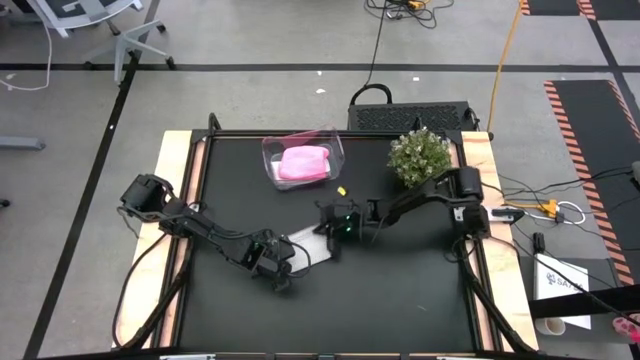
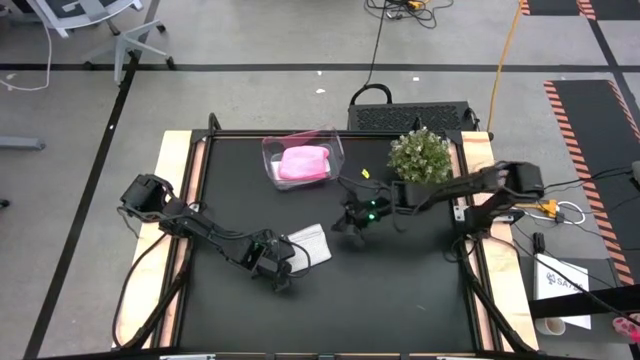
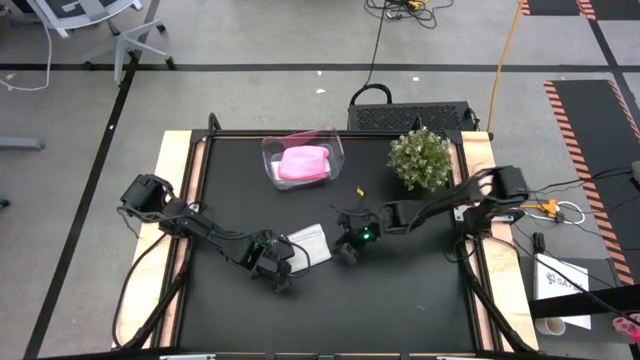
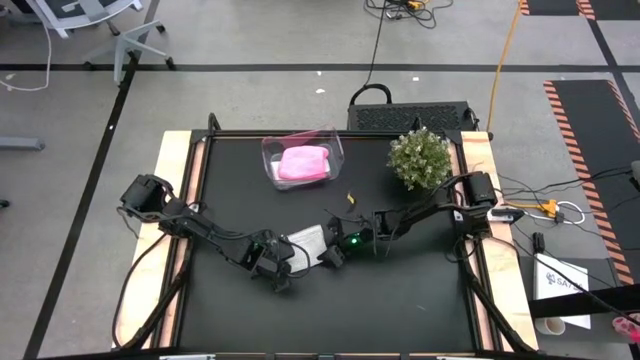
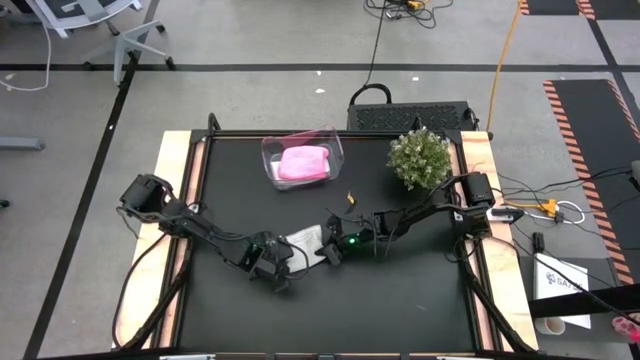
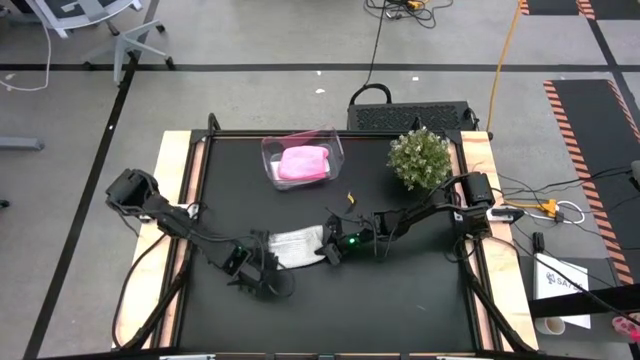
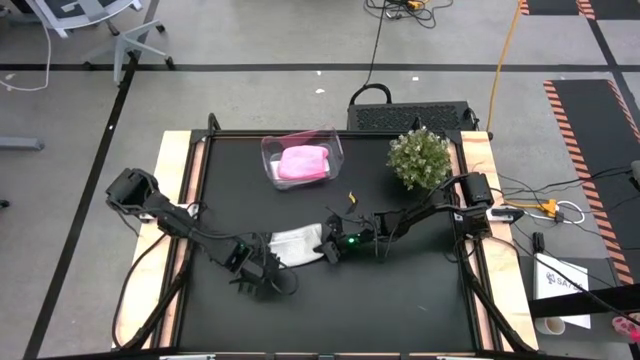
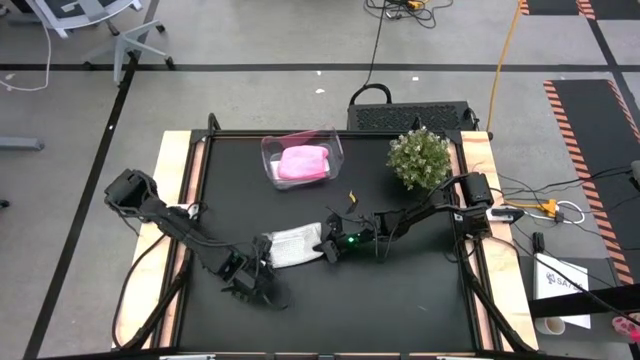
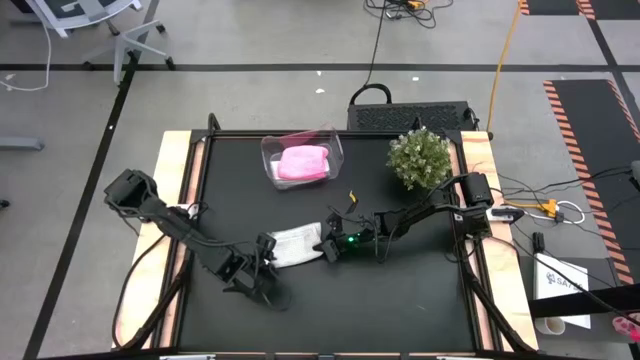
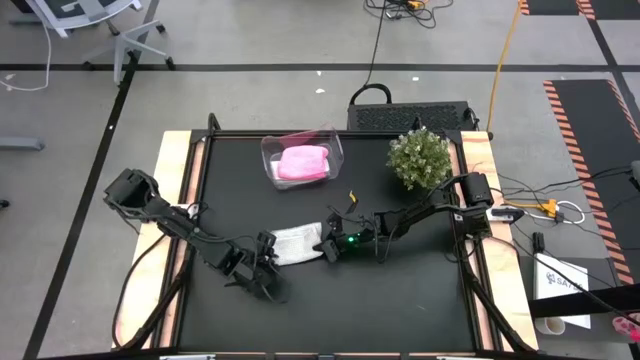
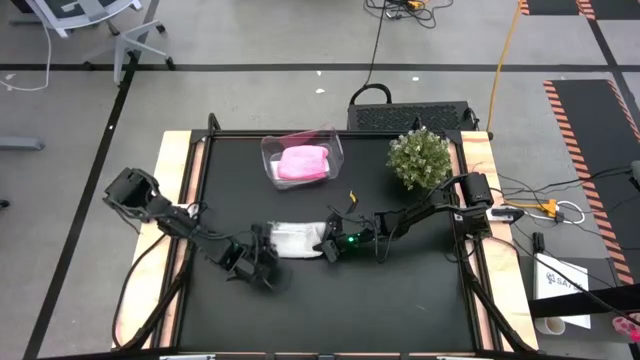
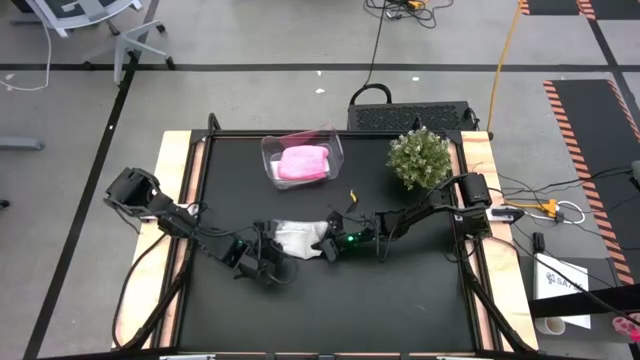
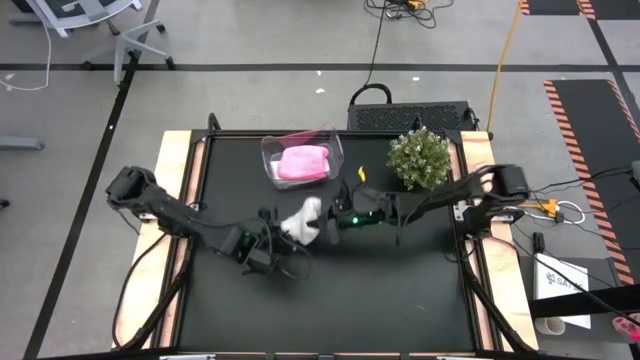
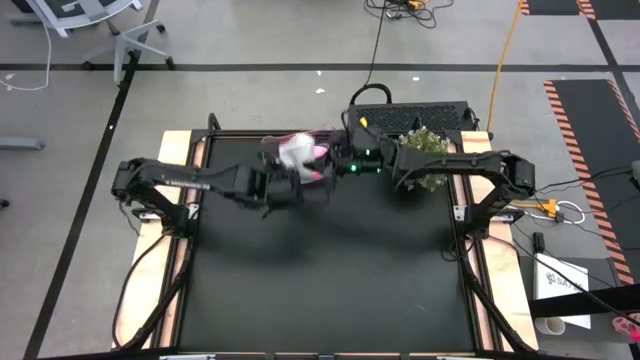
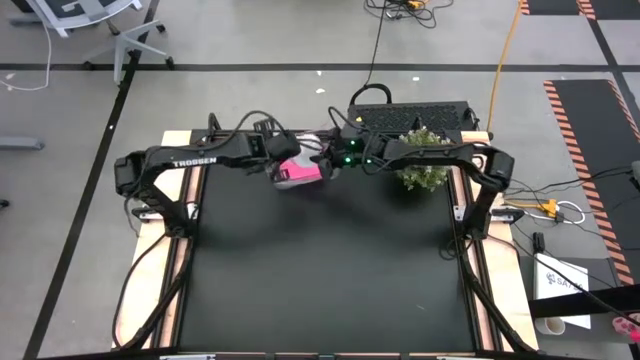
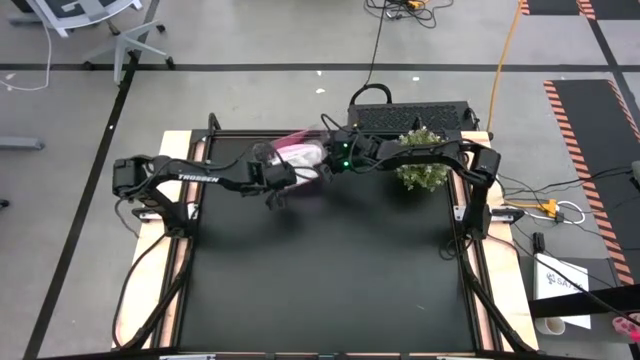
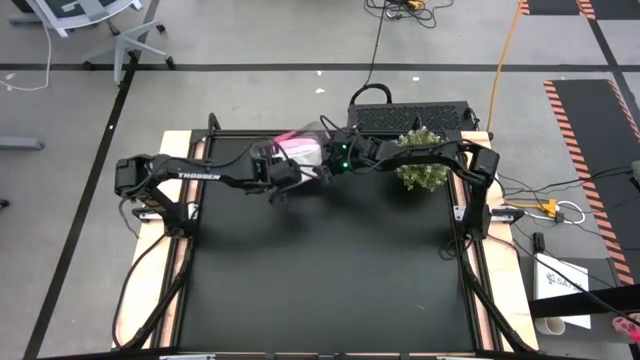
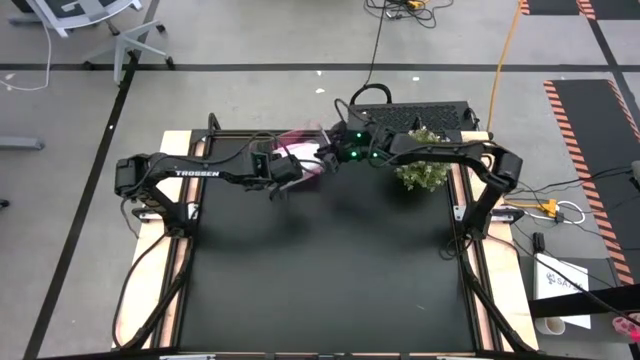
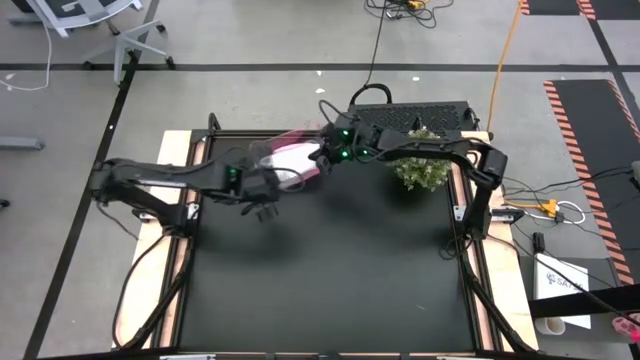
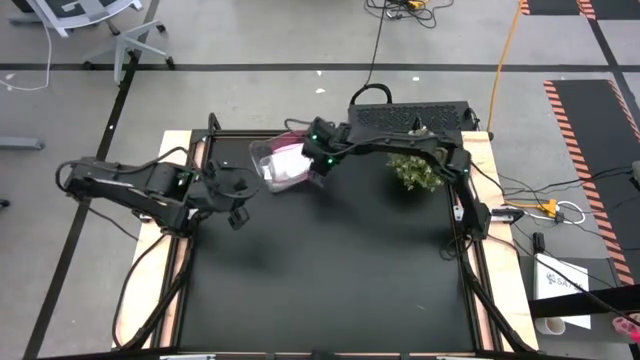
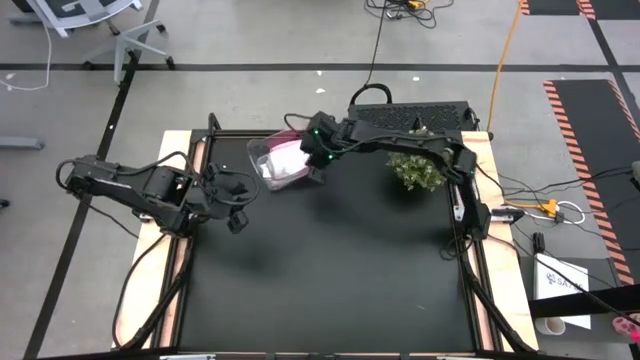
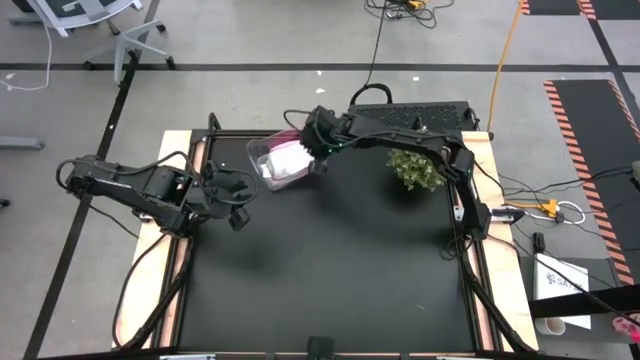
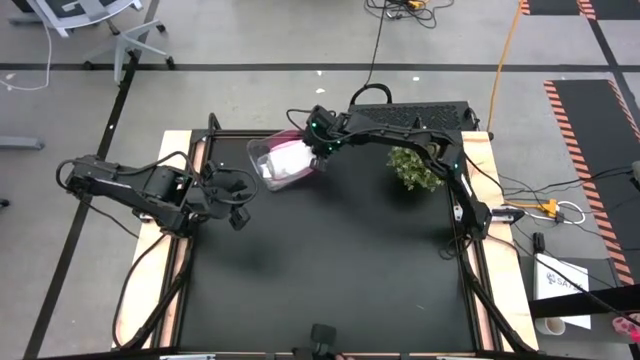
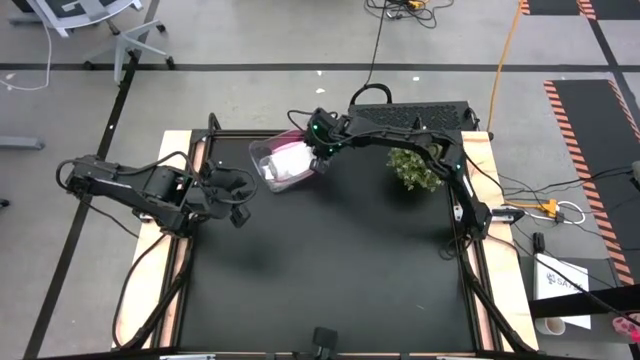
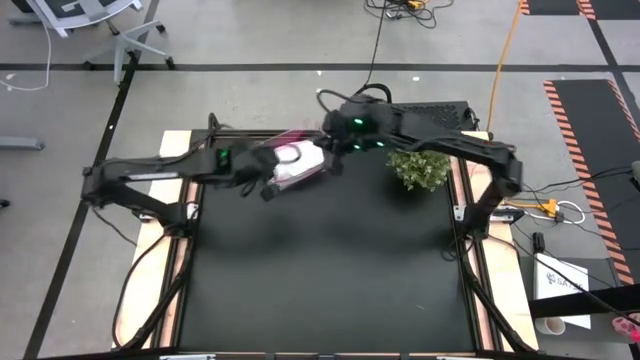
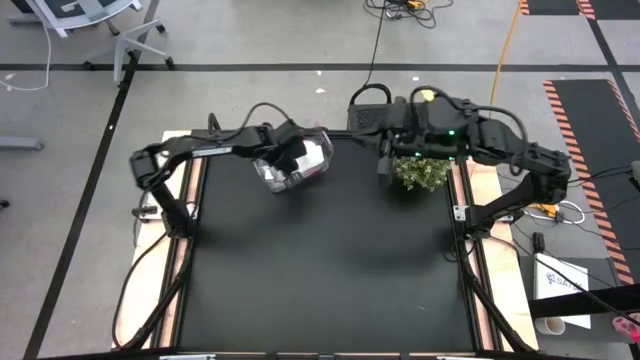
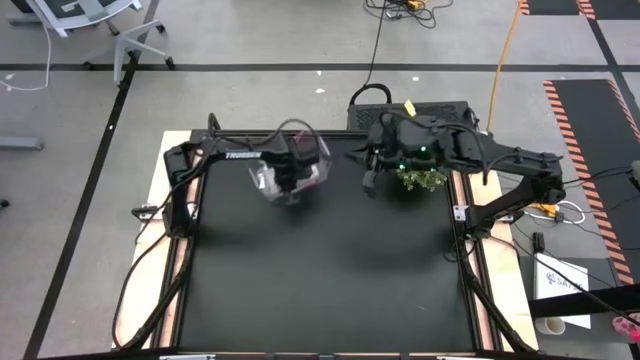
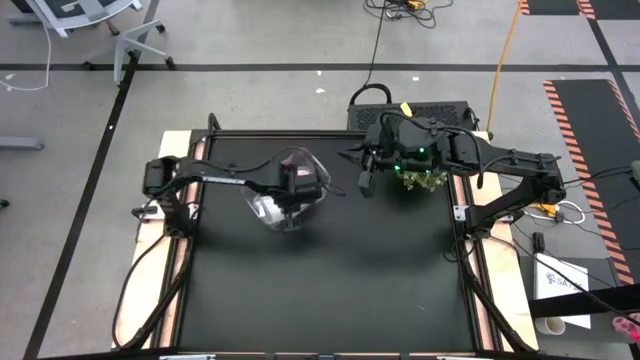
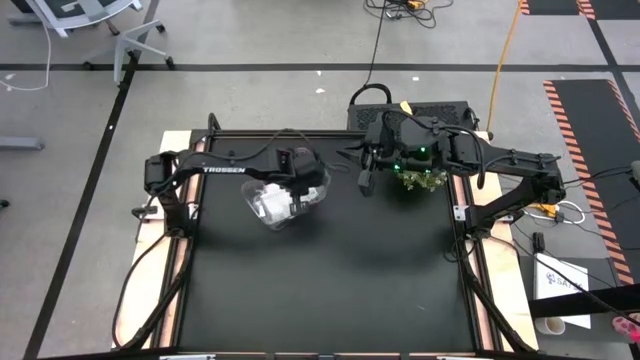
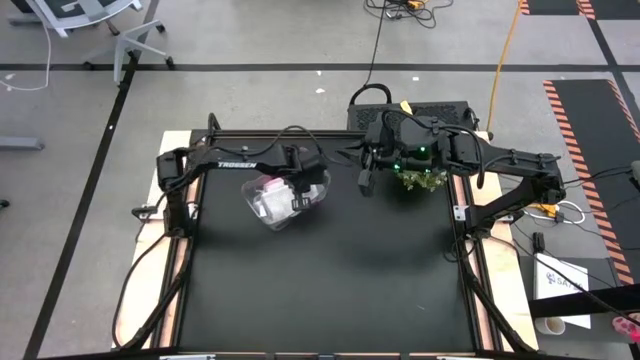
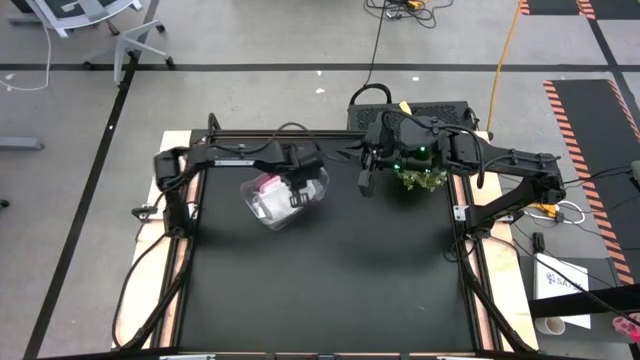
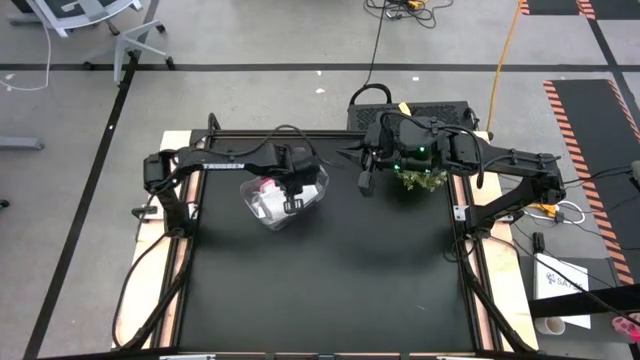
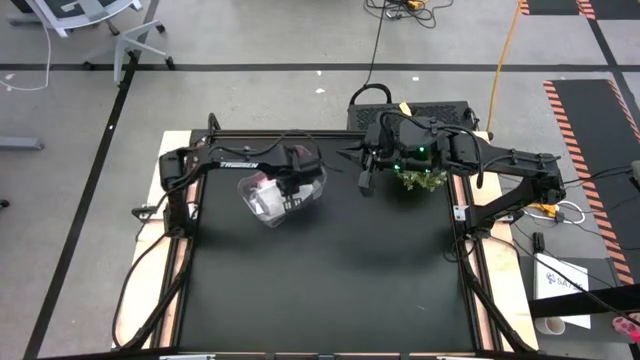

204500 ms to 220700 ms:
Task: Fold microfiber towels
Put the folded gray towel into the transparent bin

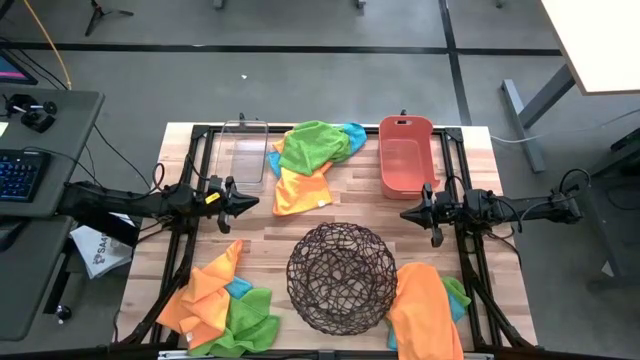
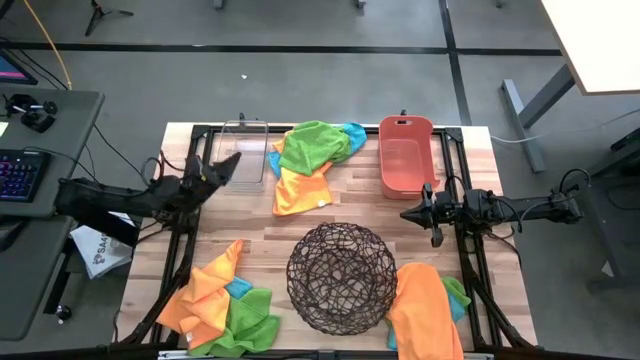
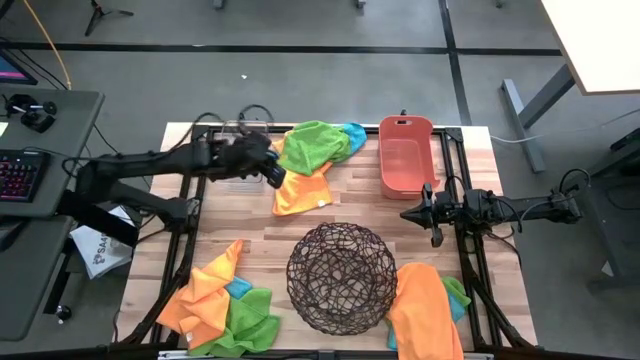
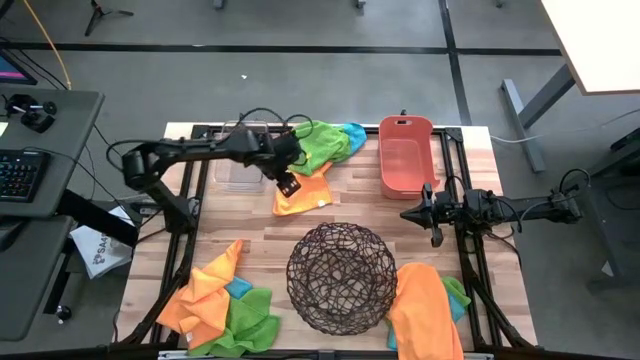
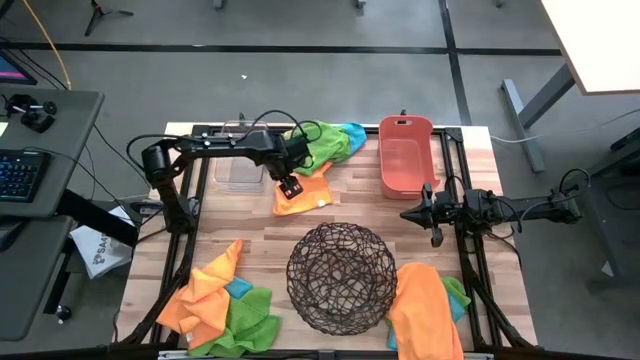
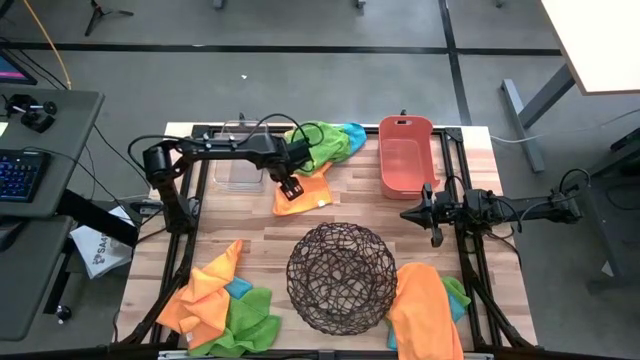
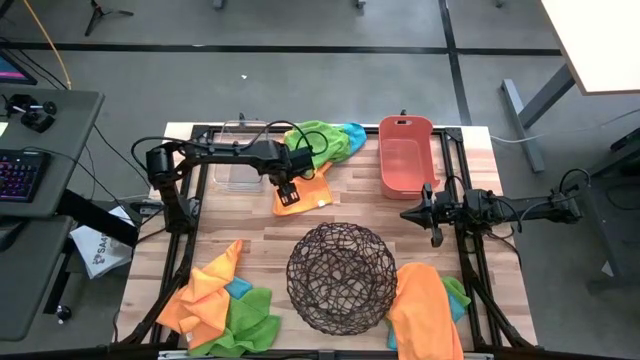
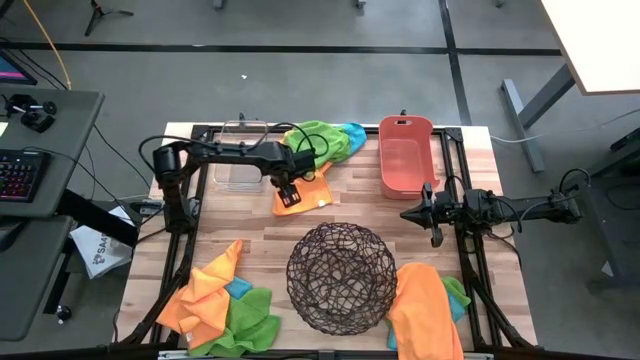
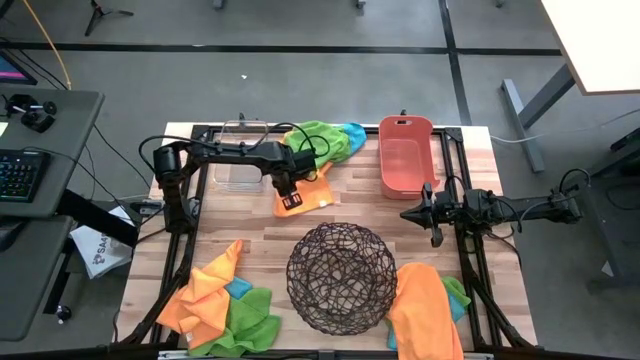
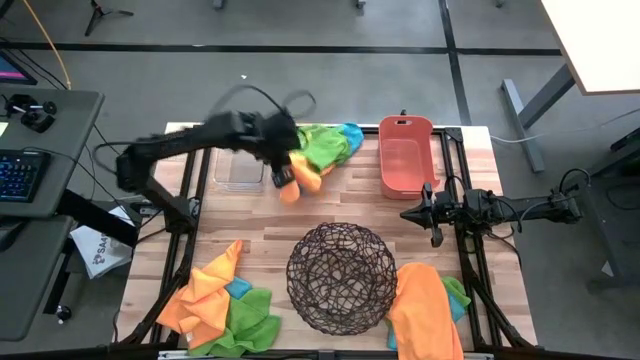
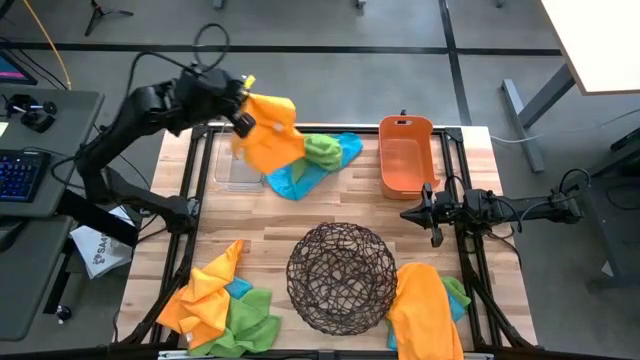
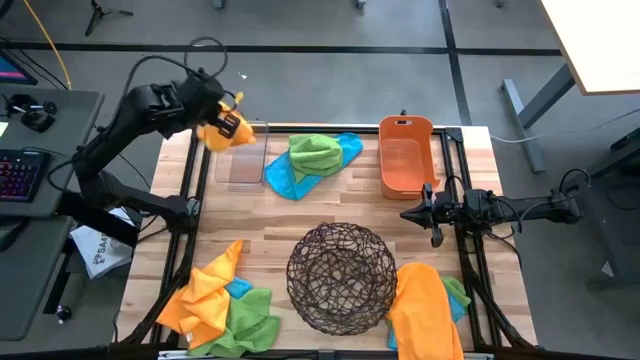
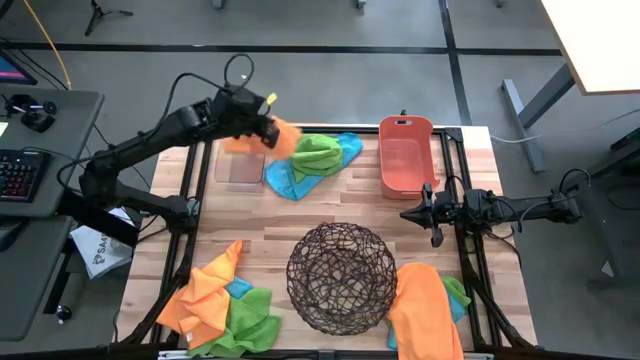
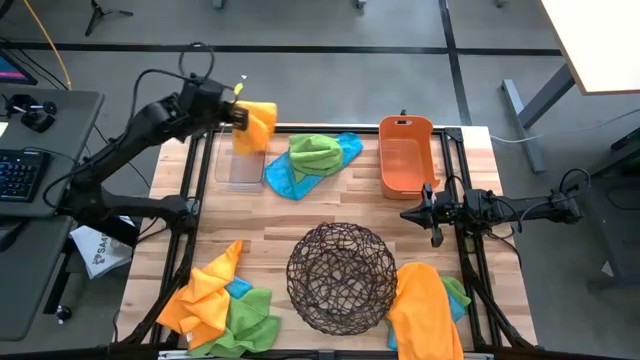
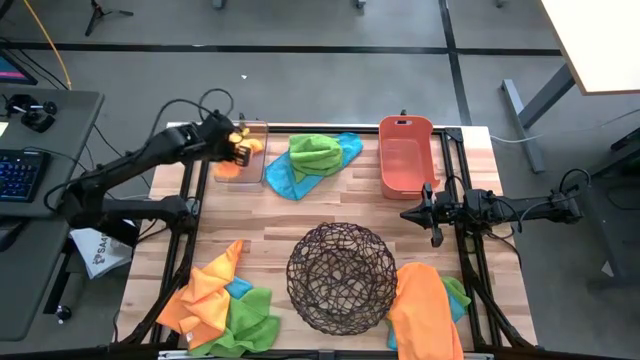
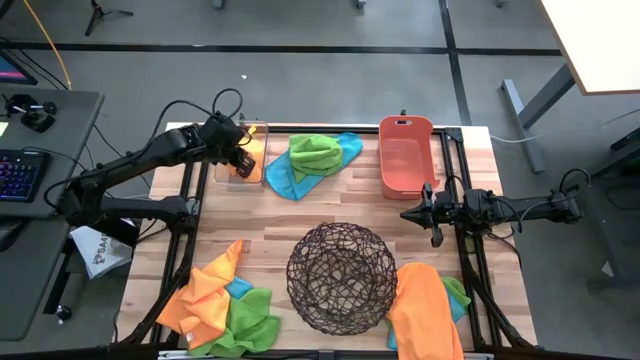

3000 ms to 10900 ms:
Task: Sort microfiber towel by color & place in baskets
Put the top orange towel into the transparent bin
